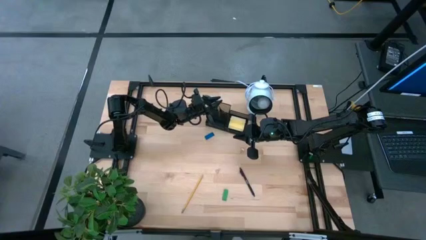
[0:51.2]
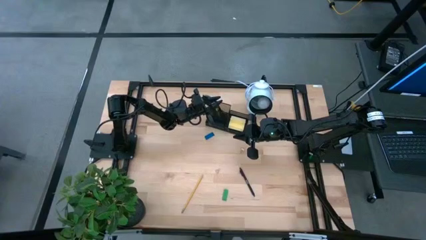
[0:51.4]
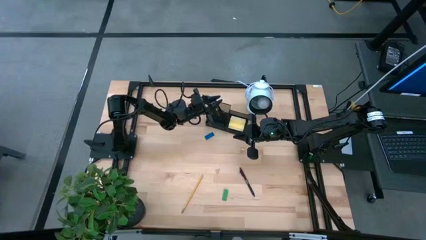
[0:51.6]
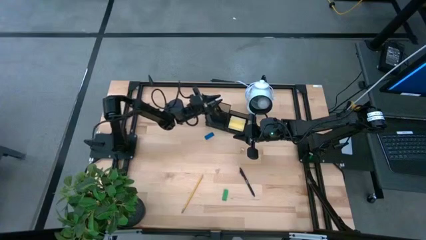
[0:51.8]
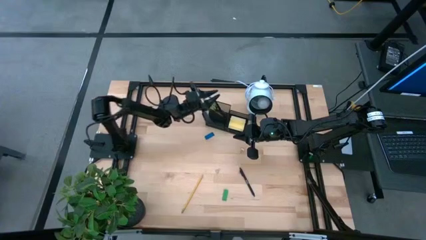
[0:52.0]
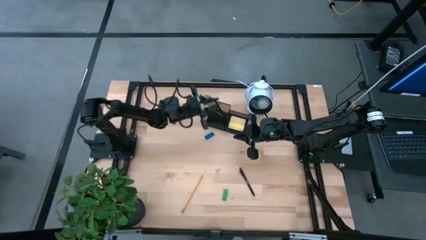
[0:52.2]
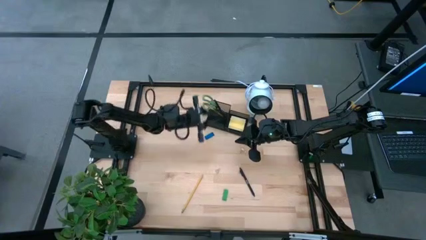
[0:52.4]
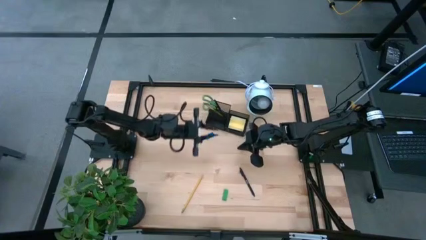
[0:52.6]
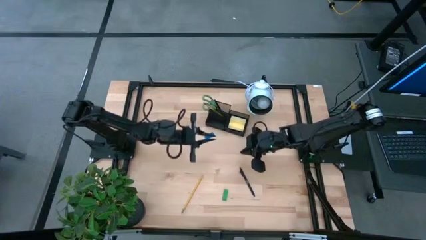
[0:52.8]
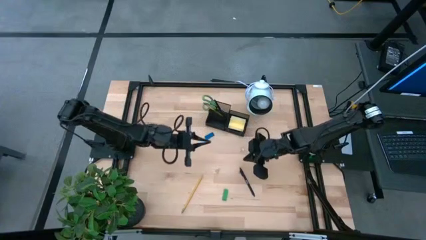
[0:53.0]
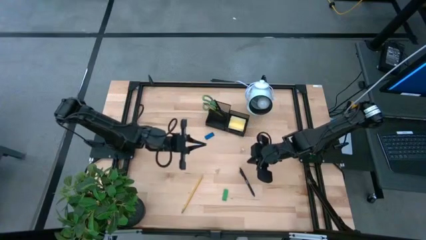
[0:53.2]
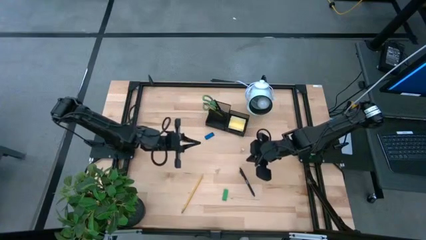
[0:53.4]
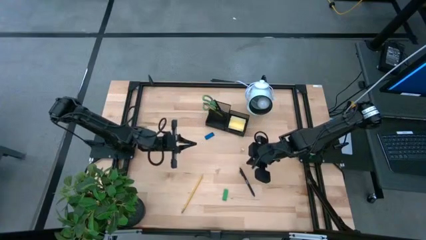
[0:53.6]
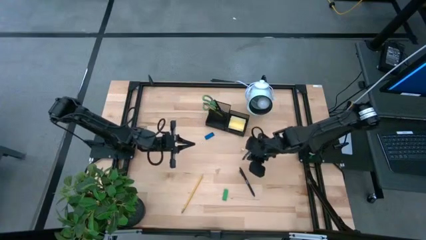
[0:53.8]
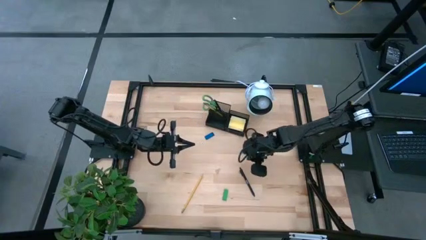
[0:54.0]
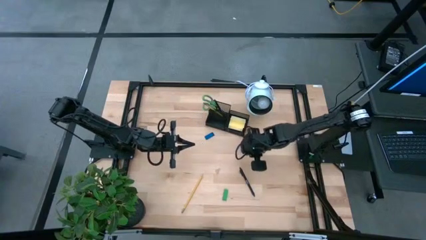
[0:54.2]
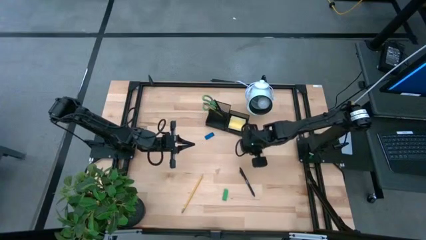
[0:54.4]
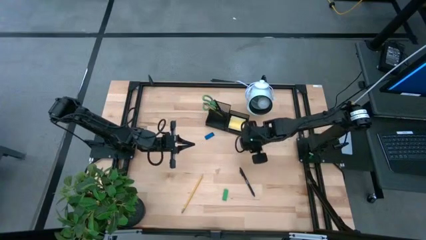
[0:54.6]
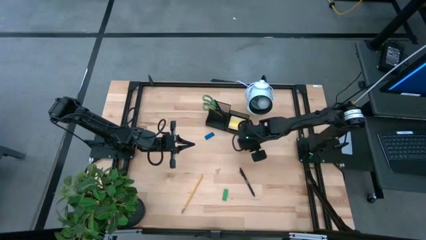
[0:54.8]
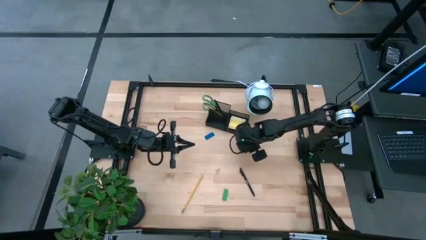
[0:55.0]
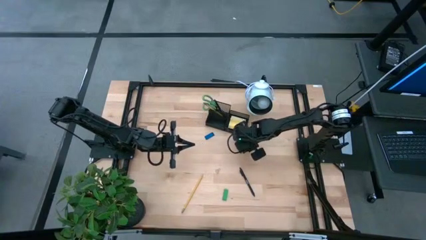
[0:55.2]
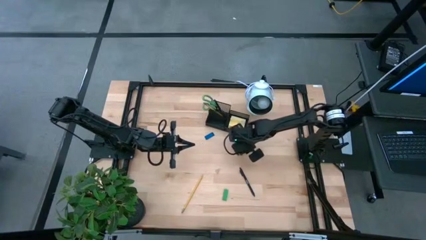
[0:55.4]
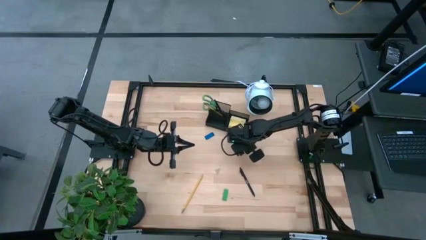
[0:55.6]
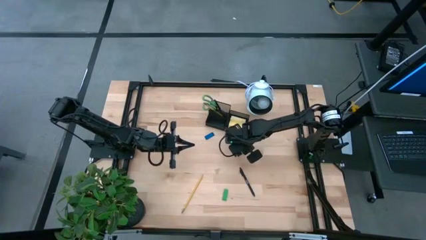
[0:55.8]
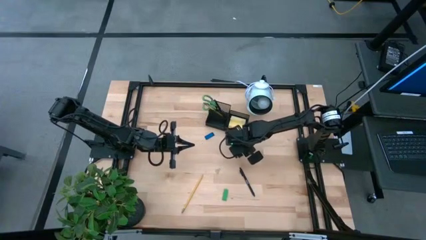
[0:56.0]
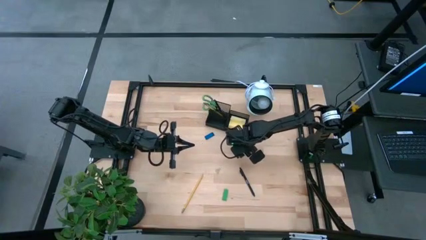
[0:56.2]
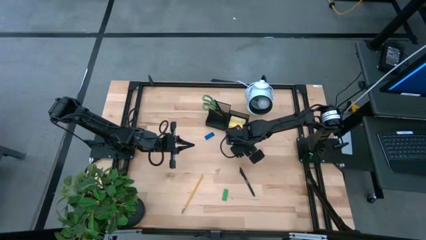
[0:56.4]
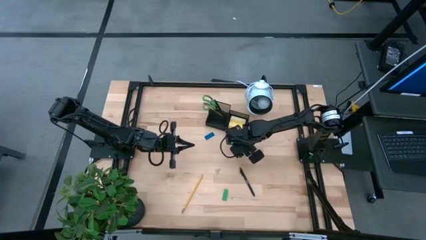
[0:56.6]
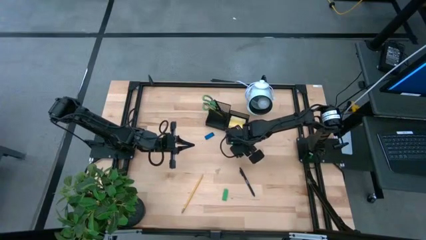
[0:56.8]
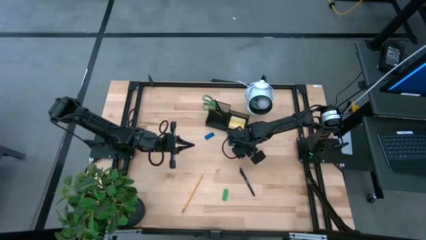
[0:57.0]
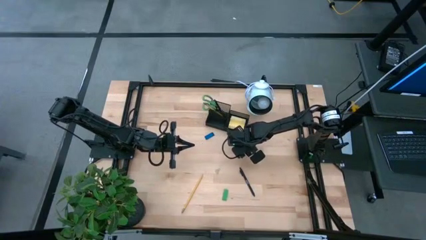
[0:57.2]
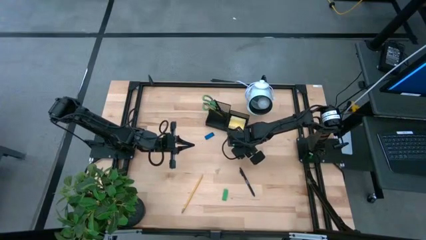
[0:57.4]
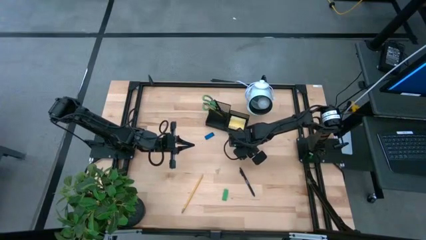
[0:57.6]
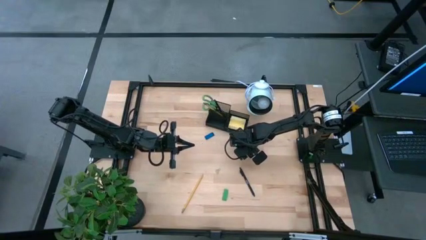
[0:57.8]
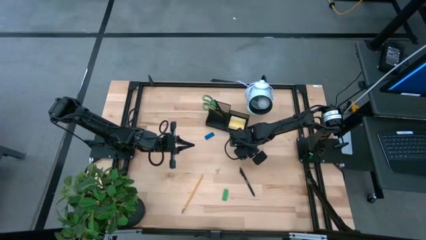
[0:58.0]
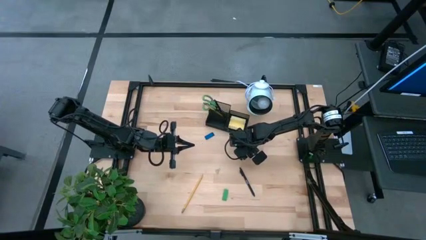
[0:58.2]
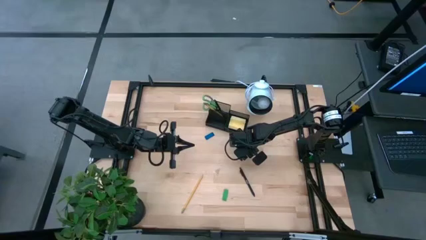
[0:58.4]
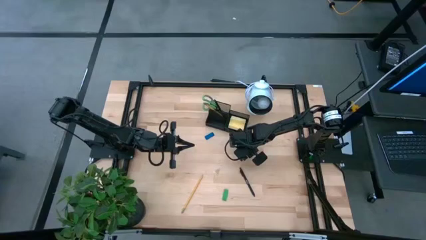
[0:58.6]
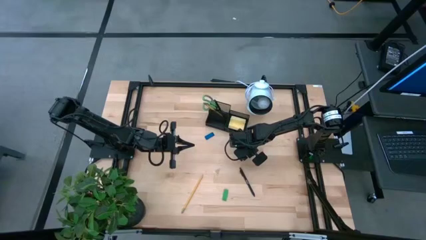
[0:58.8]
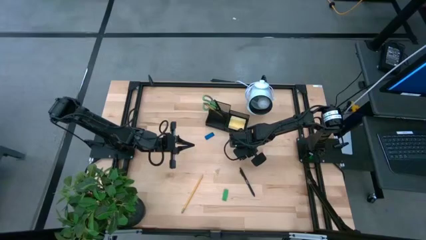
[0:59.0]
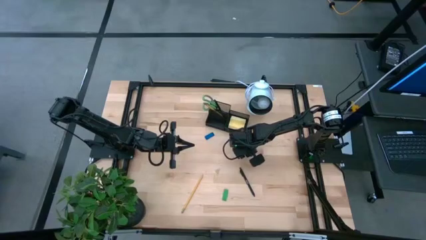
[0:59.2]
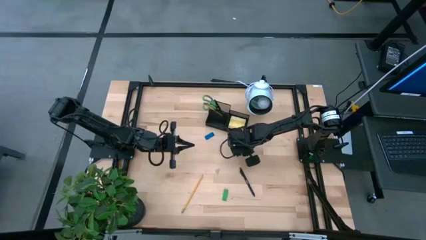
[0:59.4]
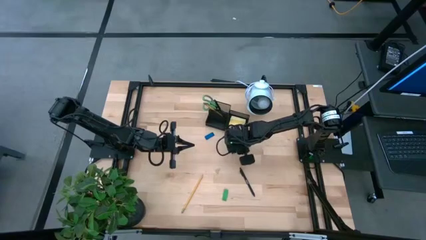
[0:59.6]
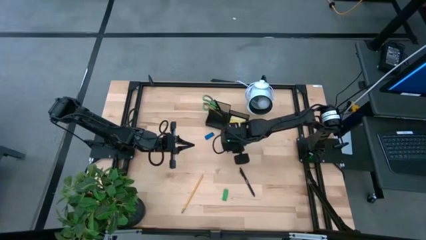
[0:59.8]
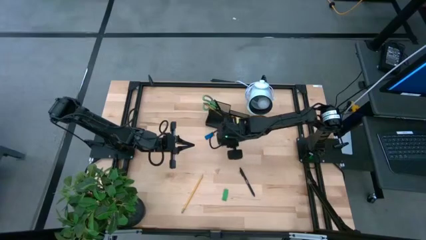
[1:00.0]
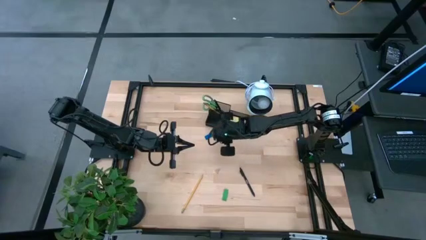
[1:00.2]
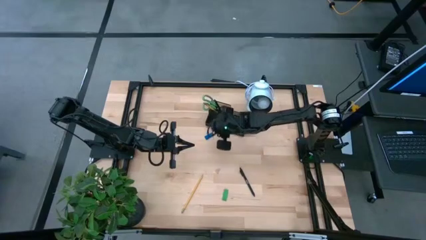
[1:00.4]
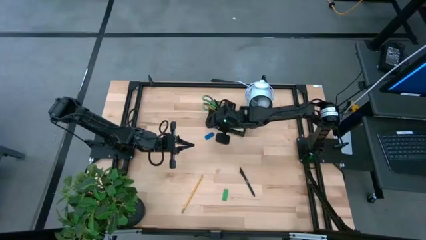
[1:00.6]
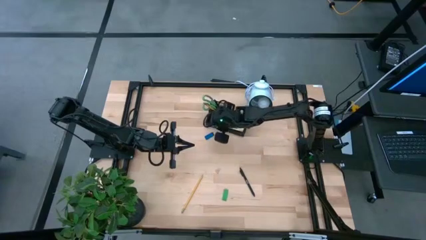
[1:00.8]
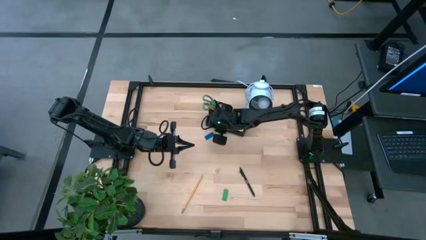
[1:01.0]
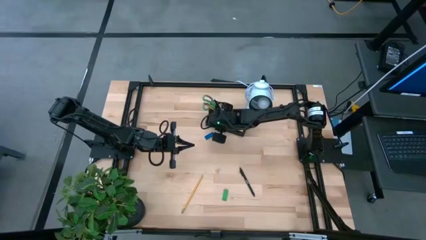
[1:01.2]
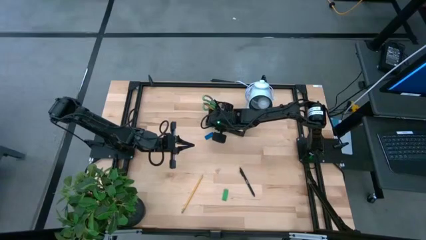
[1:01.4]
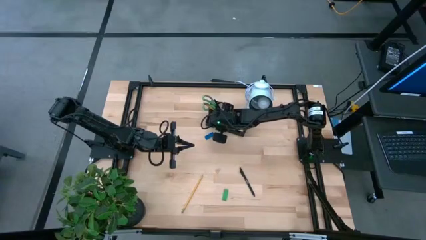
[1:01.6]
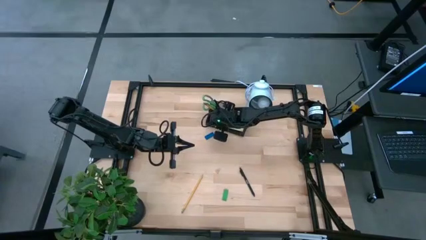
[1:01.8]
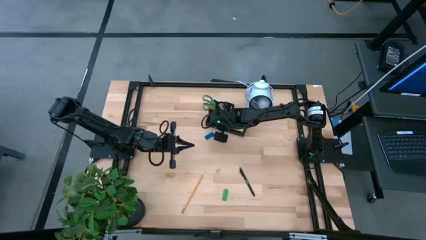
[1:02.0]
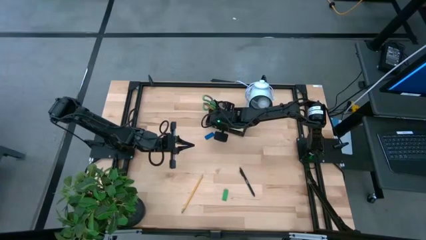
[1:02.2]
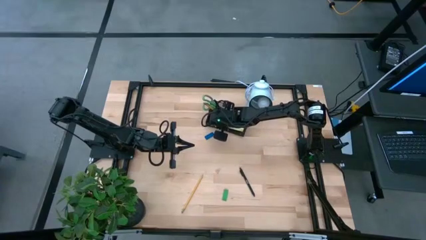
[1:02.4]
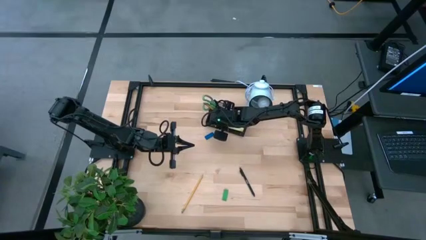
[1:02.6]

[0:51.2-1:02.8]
Task: Pick and place office supplies into organizer
Put the yellow binder clip into the black desk organizer

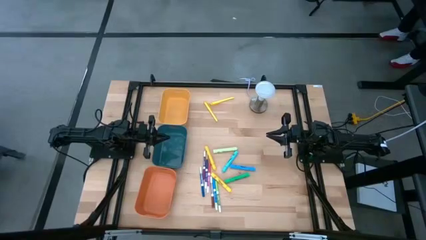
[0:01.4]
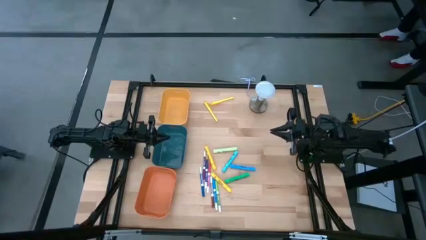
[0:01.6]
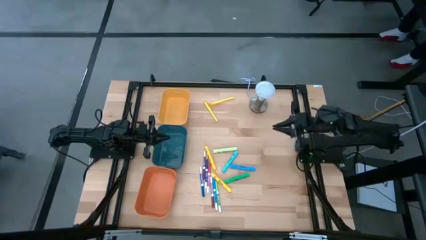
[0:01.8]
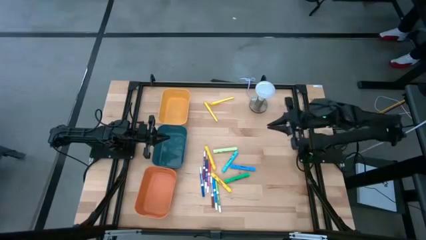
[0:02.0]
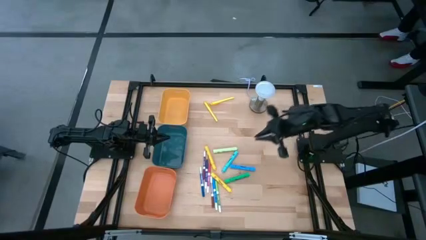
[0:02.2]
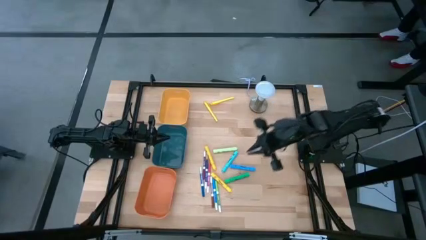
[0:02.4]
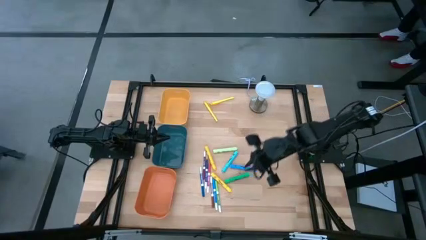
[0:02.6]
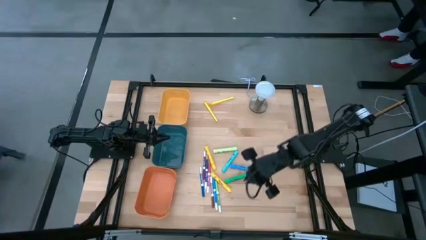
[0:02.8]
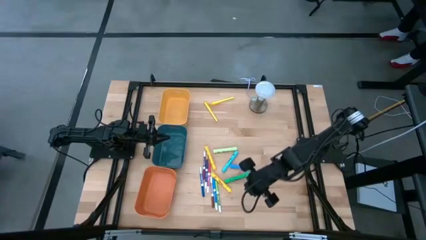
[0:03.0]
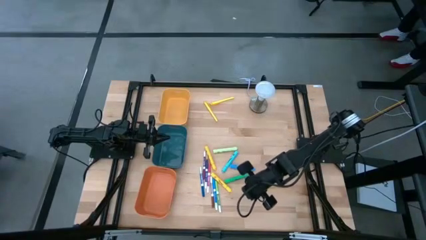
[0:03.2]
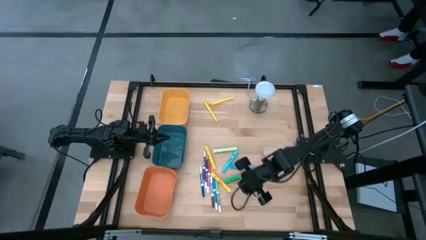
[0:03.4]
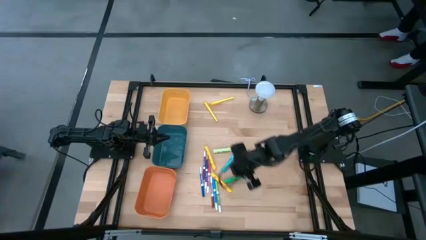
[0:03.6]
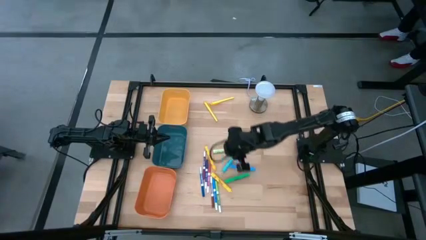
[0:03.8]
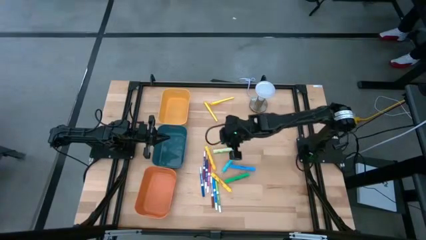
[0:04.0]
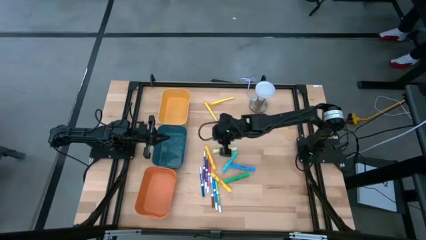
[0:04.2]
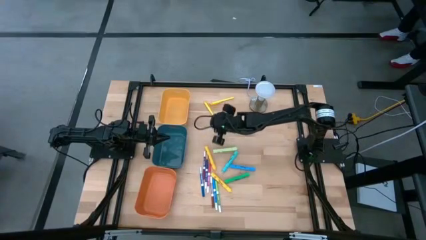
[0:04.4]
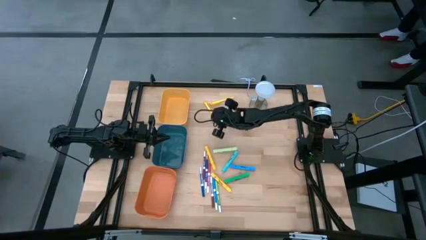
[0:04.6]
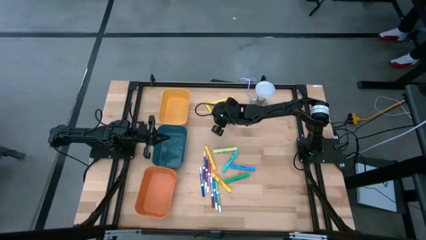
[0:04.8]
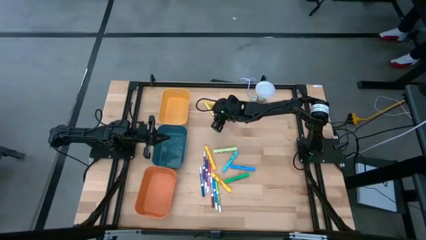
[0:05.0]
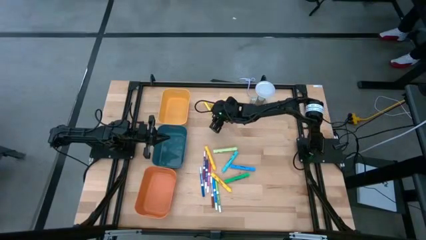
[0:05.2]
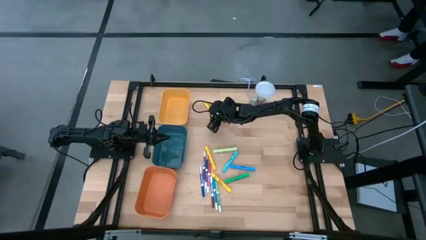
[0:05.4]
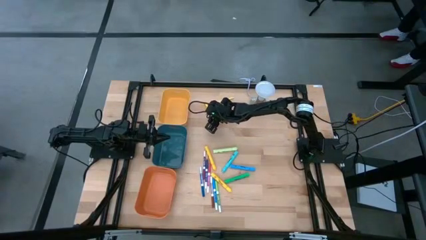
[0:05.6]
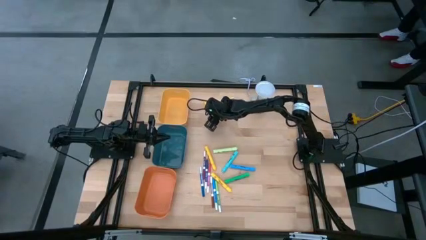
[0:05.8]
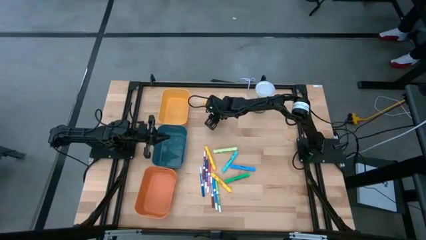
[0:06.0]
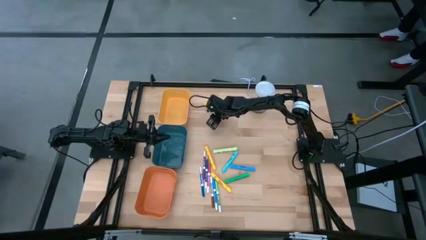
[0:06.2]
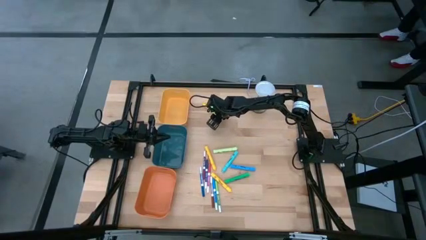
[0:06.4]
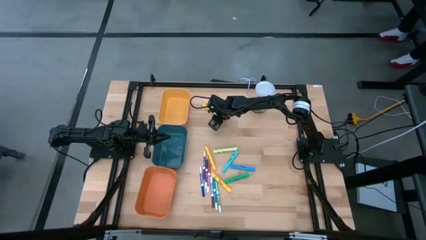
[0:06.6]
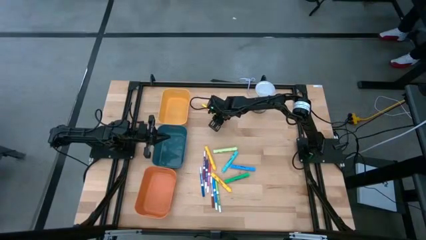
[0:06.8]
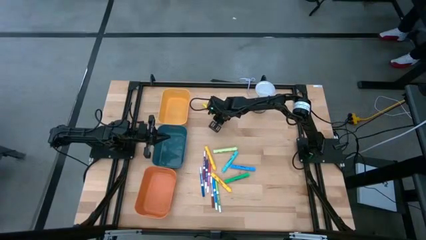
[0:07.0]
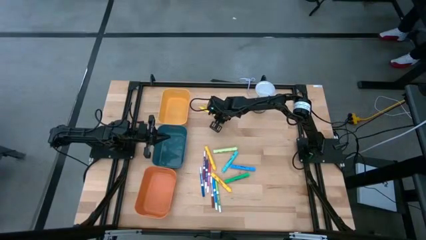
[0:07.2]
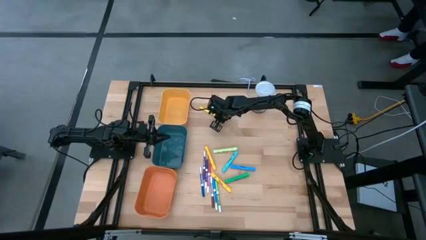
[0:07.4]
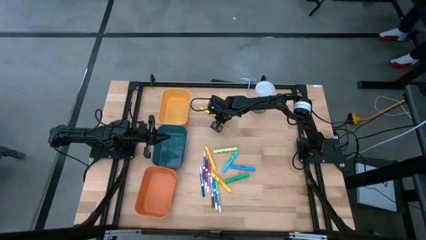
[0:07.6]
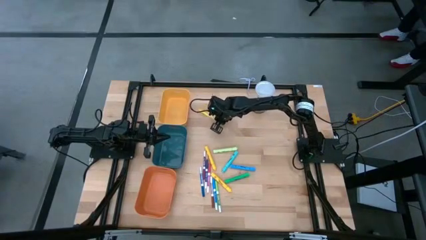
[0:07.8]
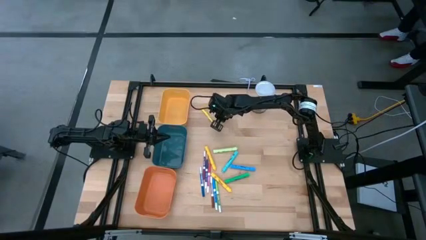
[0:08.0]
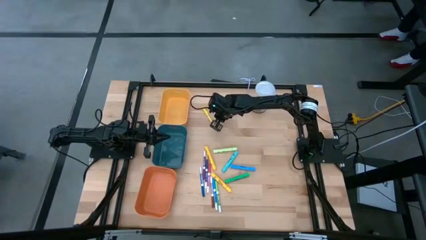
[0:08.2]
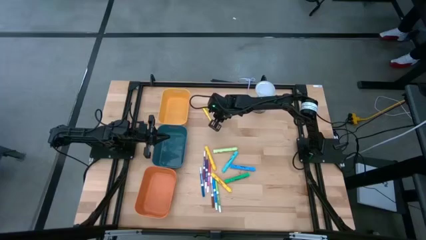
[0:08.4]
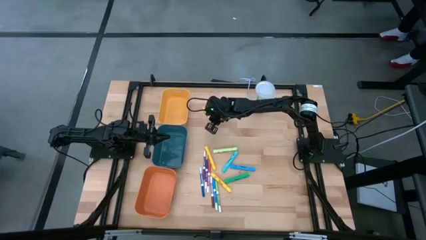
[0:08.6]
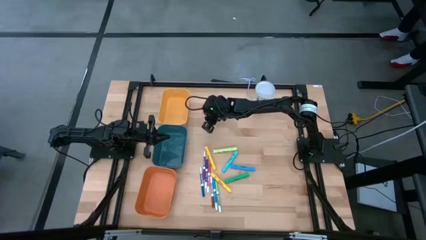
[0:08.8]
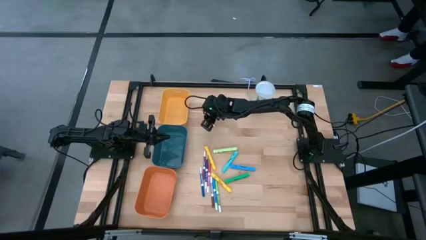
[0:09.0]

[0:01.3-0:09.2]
Task: Pick & Place Markers
Put the bottom yellow pen into the yellow bin
